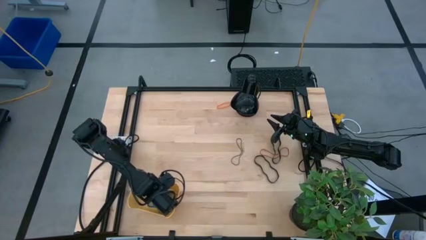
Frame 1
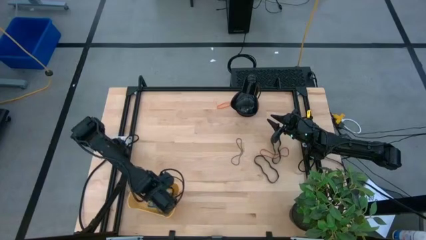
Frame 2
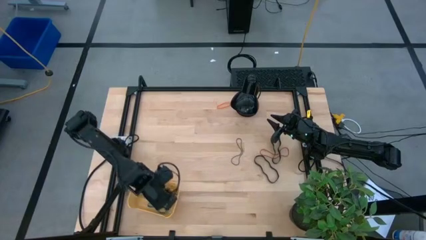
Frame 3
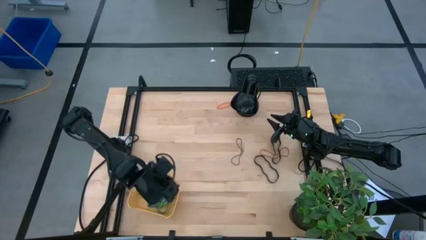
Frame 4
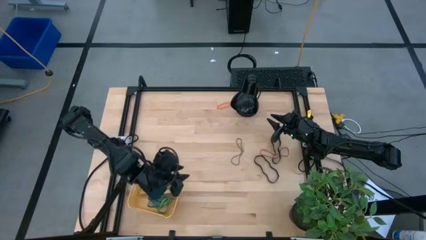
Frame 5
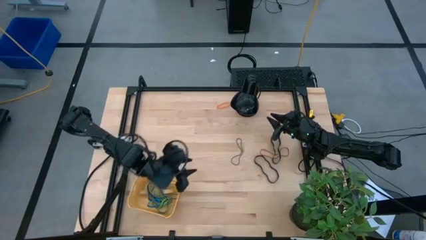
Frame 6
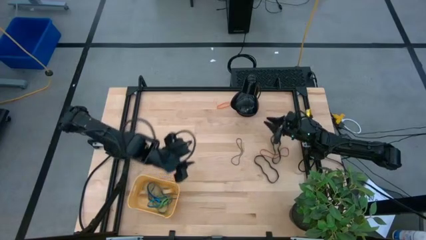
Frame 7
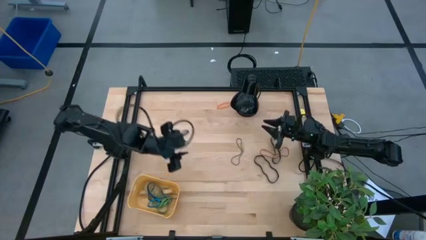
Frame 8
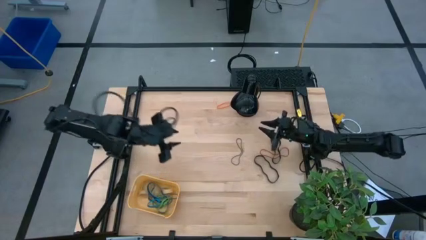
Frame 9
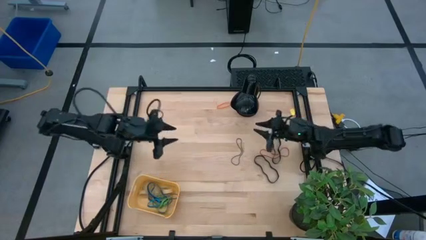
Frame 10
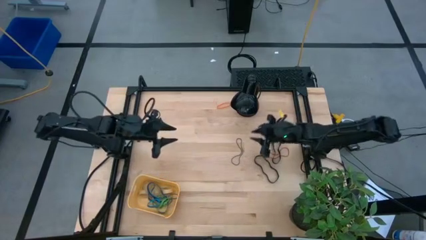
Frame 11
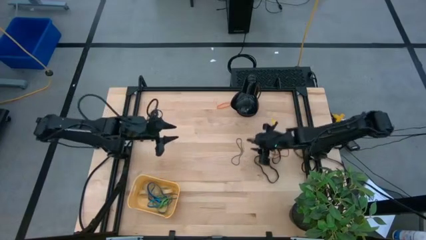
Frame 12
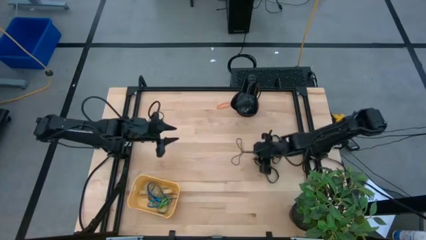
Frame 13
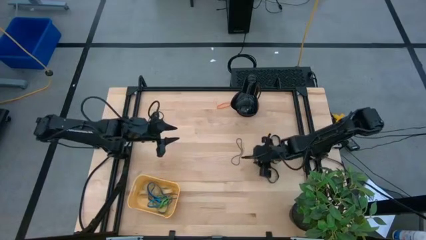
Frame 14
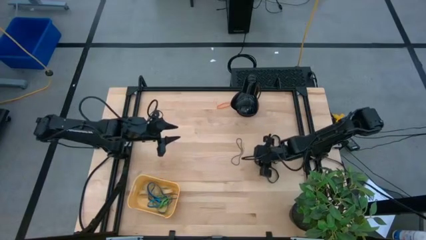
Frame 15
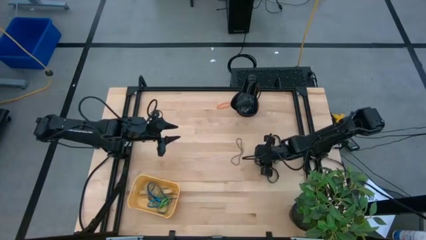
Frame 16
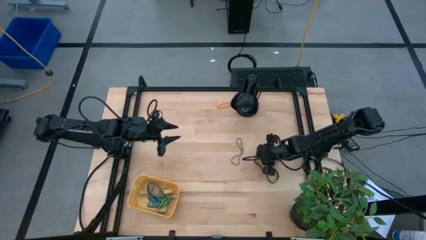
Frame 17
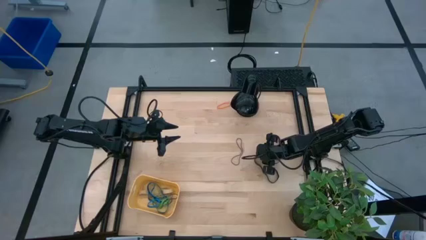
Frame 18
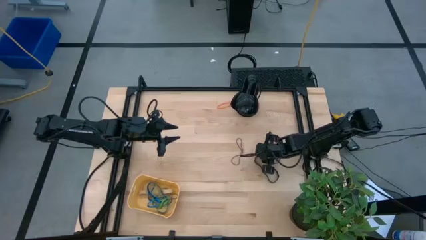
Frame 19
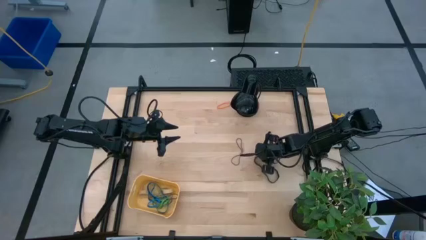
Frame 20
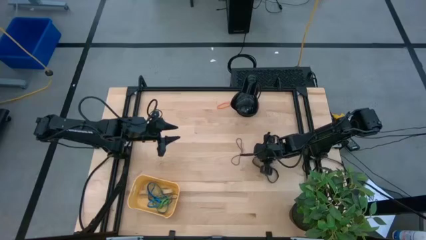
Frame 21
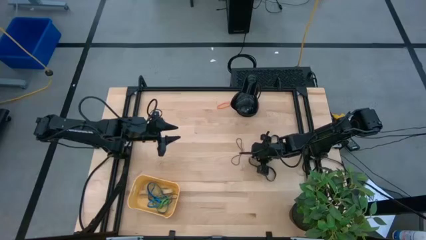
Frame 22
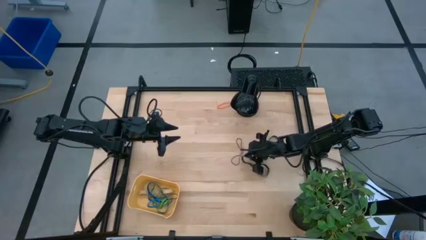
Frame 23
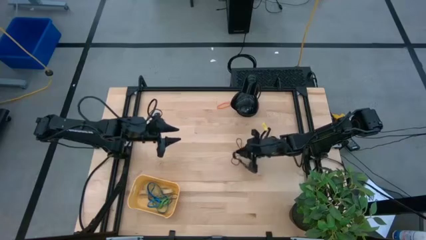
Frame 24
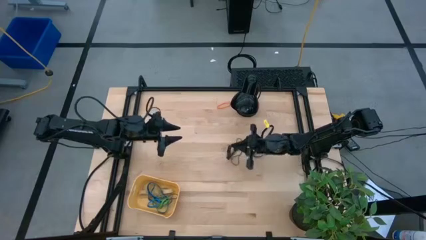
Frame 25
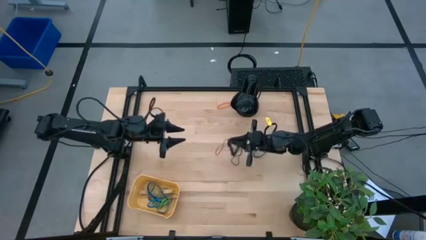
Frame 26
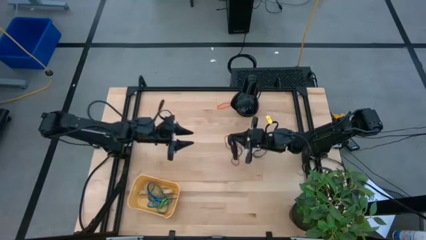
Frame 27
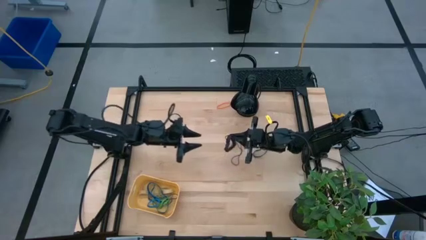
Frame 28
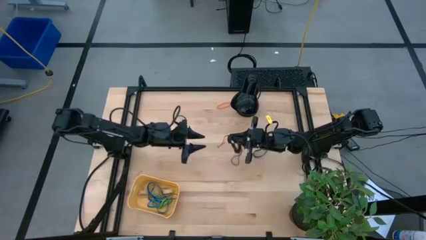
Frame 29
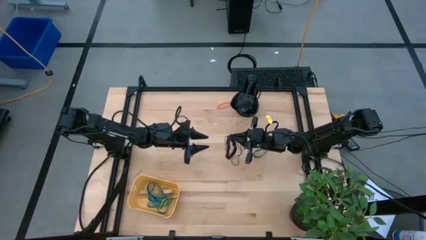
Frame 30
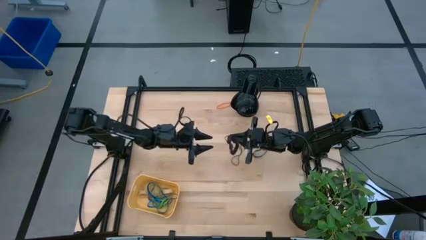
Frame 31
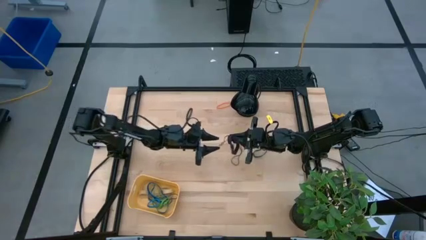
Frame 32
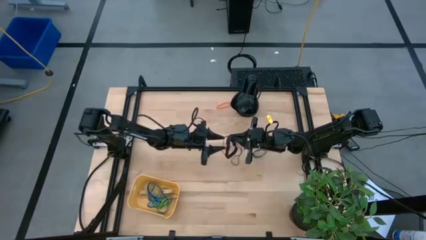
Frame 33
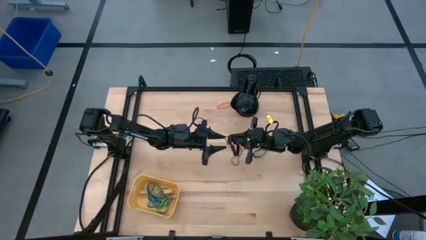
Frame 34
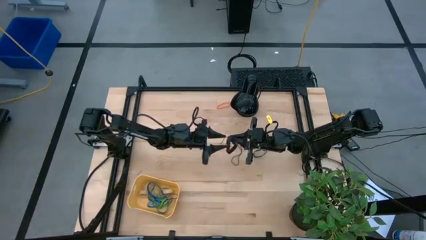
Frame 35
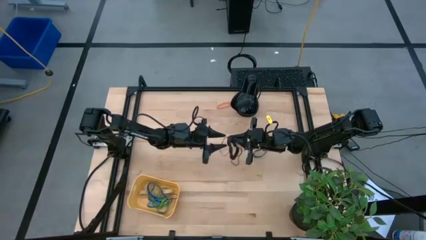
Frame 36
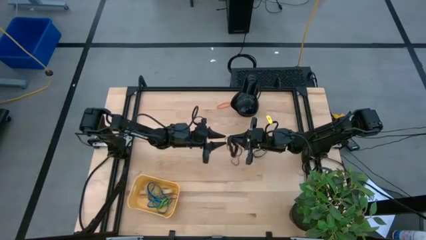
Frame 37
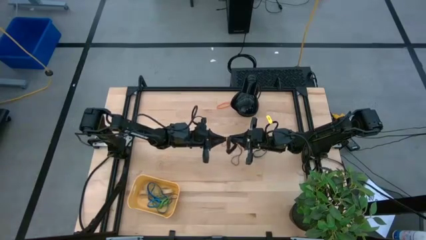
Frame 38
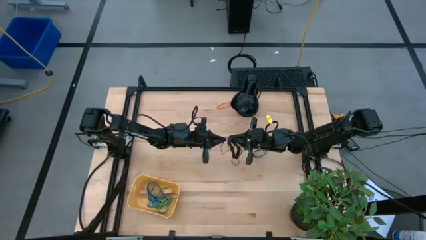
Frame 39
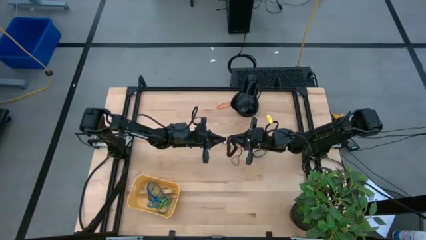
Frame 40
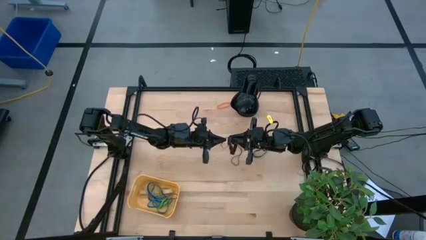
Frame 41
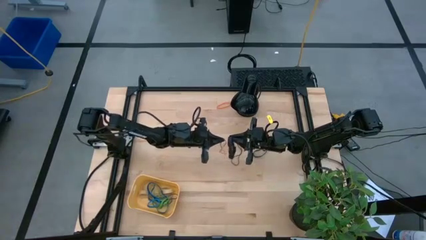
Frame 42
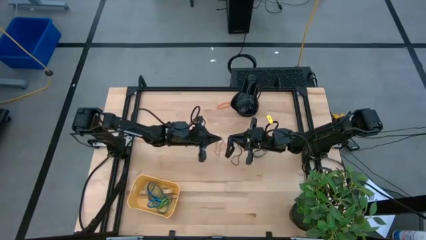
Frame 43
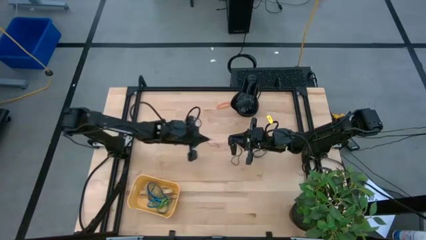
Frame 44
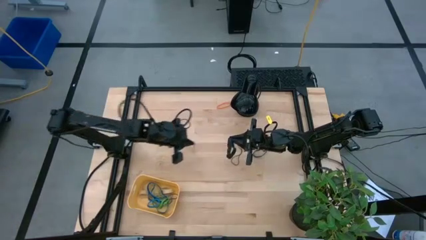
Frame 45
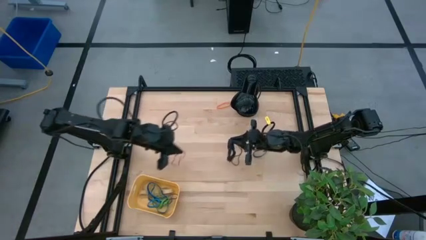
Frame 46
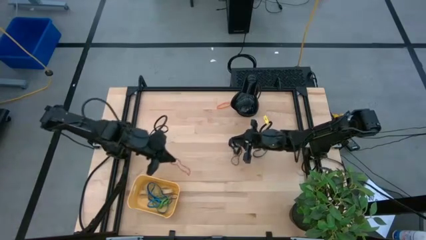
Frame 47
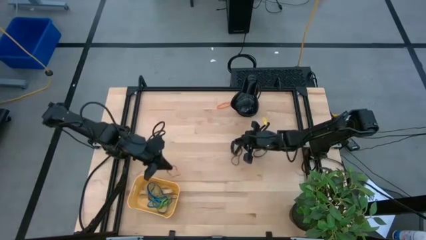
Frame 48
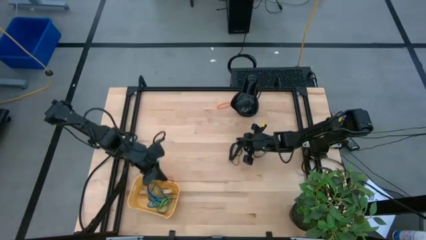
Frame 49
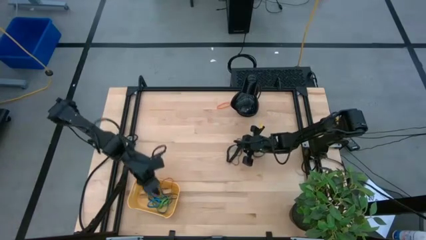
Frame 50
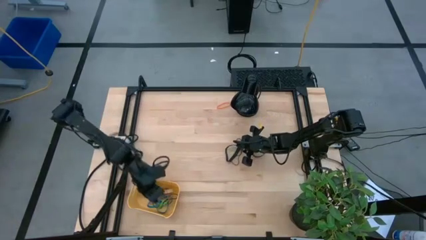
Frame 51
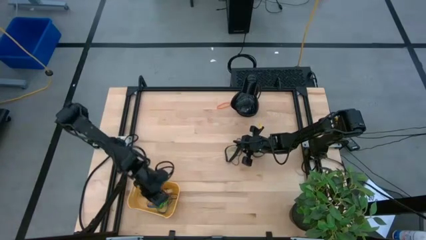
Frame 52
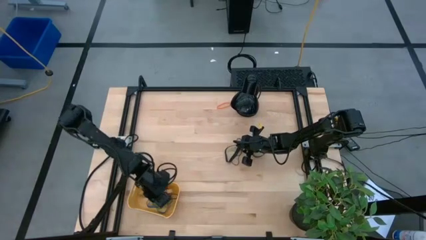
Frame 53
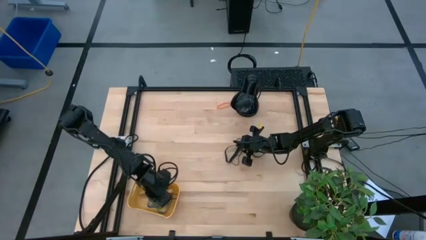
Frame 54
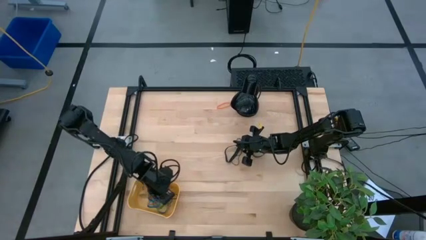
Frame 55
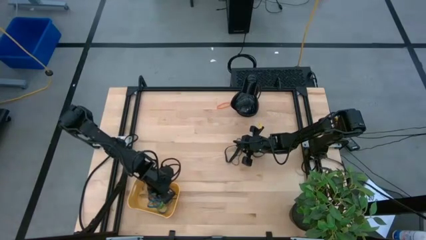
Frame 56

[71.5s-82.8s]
Task: Pick and place rubber bands into bin
Put the red rubberband into the yellow bin

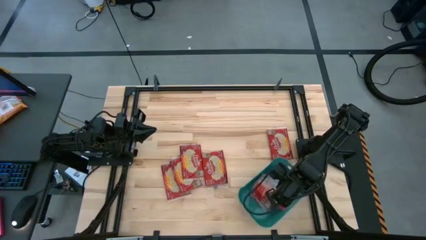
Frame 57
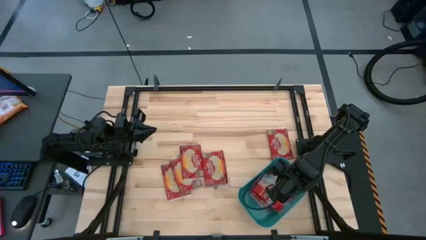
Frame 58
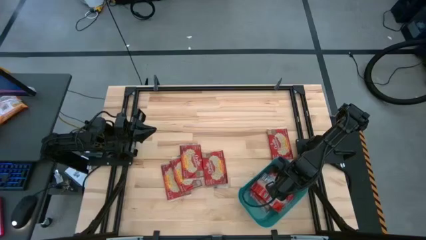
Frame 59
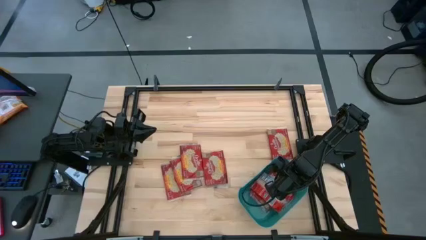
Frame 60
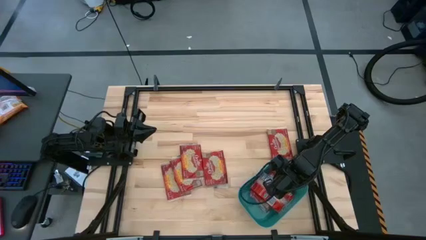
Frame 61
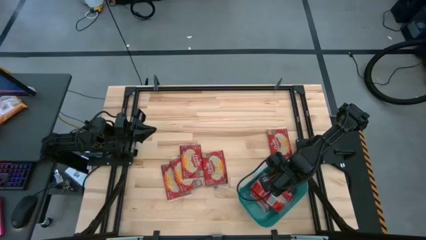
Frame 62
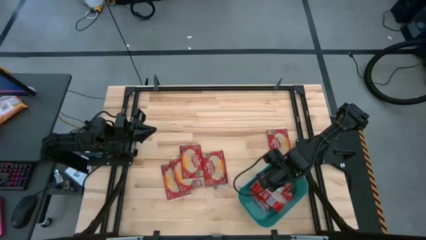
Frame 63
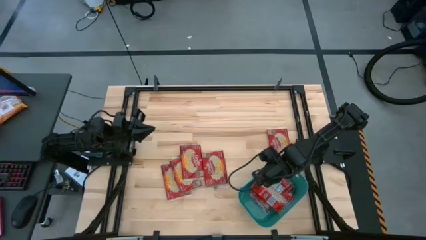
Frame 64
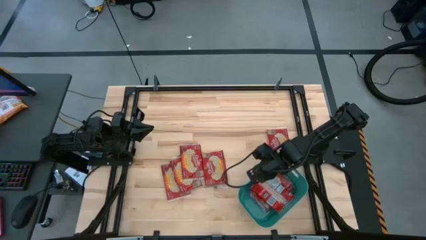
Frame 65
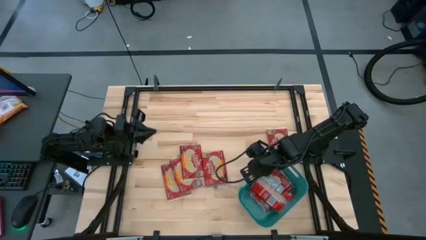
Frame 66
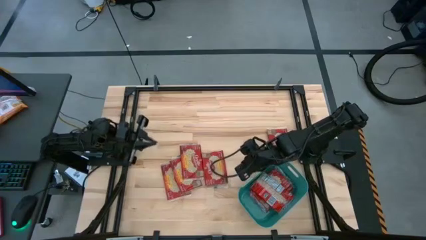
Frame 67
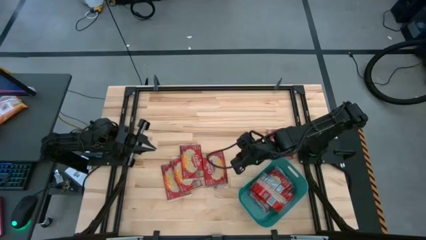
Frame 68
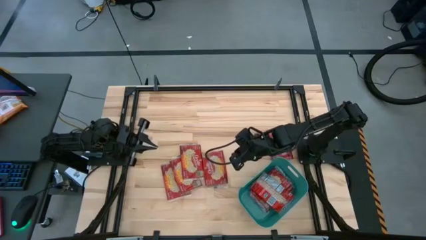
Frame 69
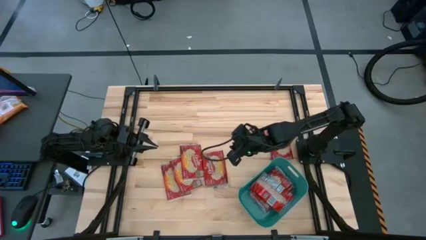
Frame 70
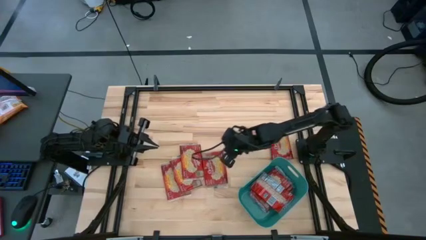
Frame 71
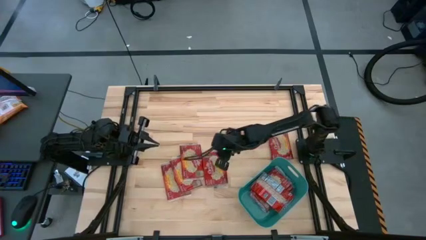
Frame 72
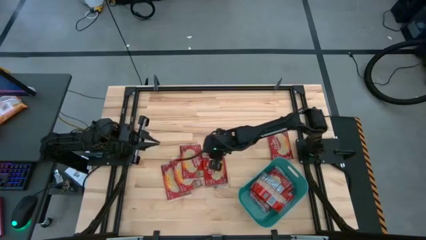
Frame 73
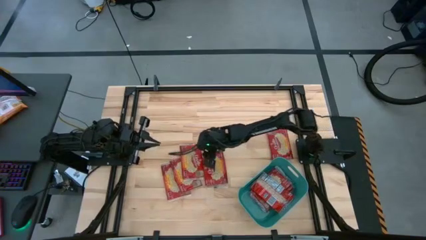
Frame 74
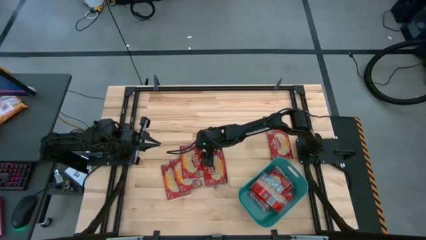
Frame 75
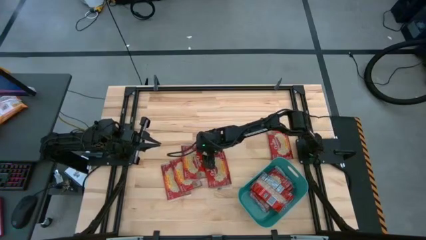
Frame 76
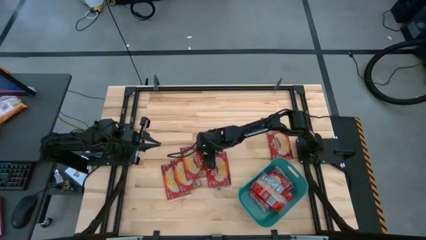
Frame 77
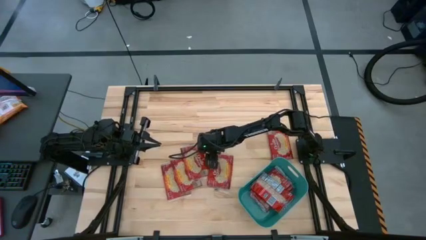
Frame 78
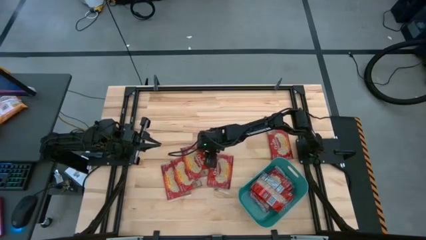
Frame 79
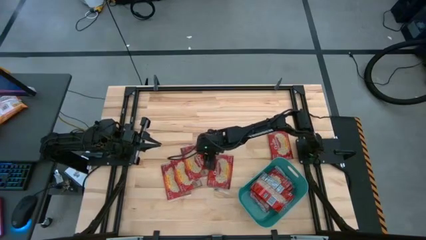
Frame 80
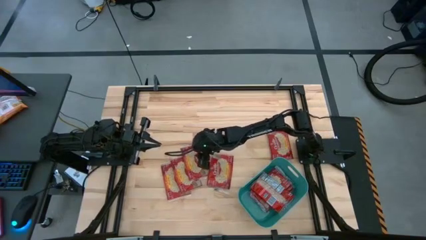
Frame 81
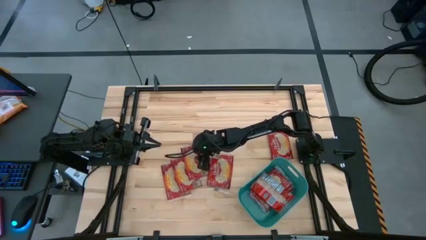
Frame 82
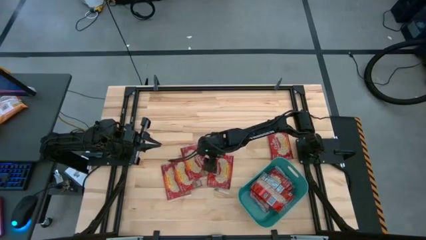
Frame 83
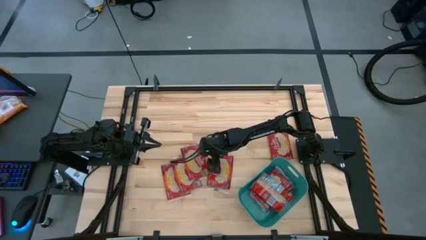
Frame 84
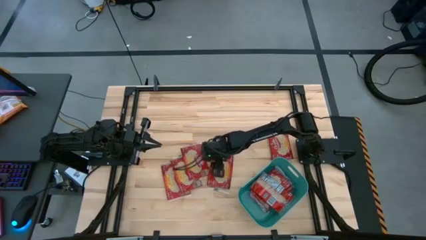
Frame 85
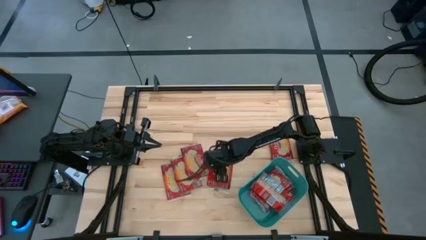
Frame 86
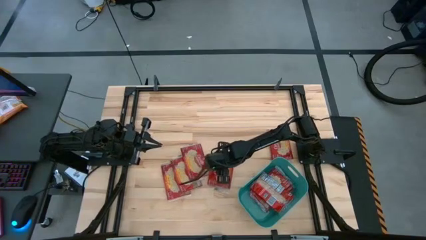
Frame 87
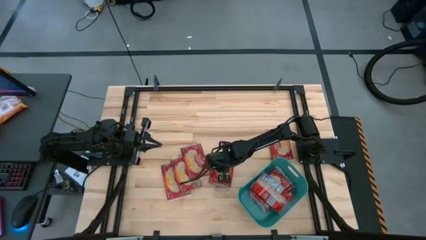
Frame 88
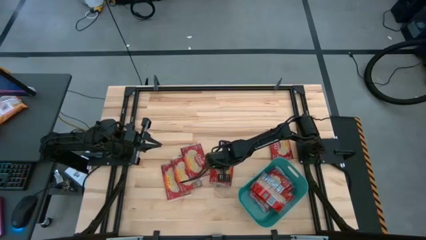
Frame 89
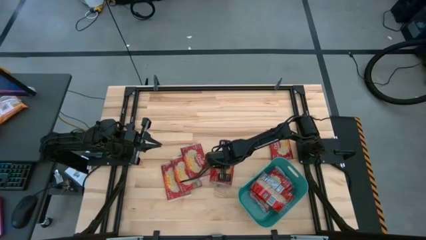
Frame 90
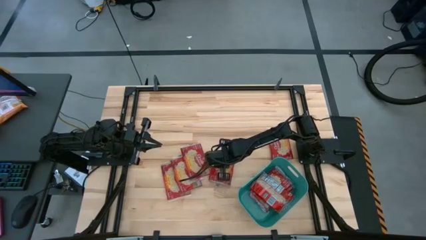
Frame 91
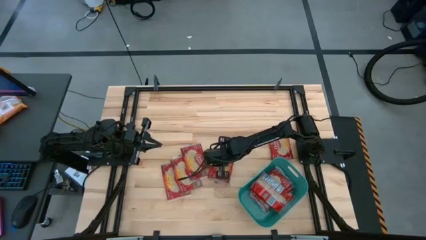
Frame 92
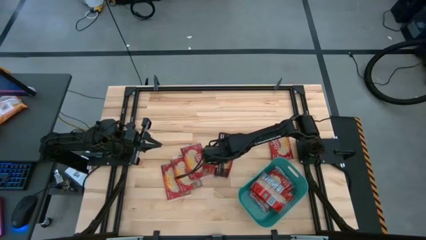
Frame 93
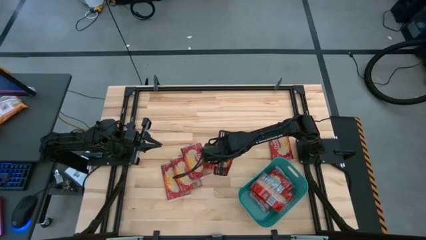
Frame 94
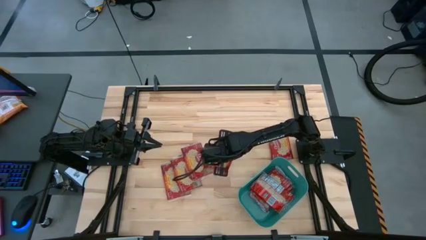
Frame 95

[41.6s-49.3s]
Task: Sort popcorn bags into baskets
Put the red popcorn into the green bin
